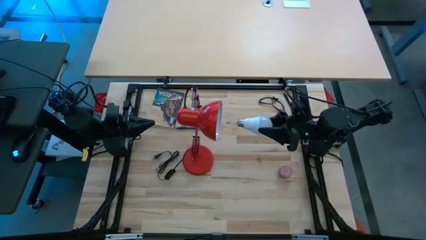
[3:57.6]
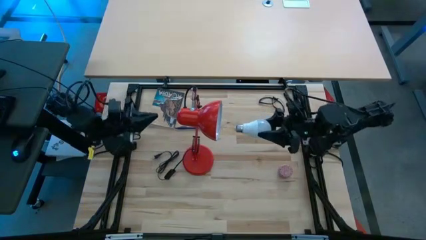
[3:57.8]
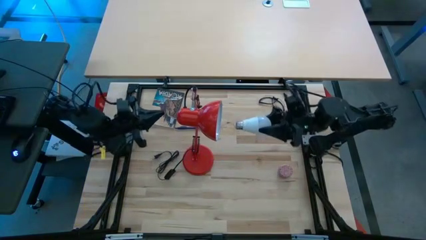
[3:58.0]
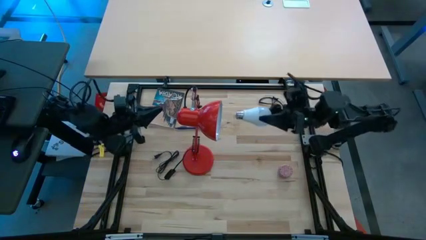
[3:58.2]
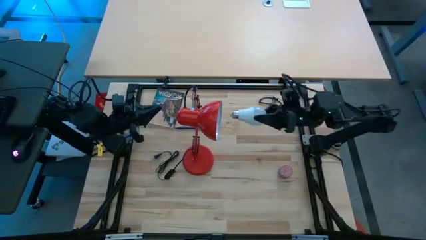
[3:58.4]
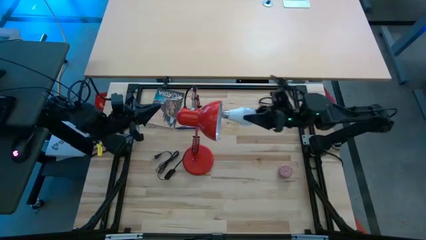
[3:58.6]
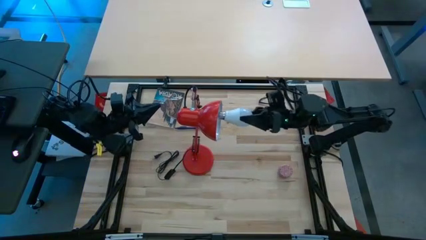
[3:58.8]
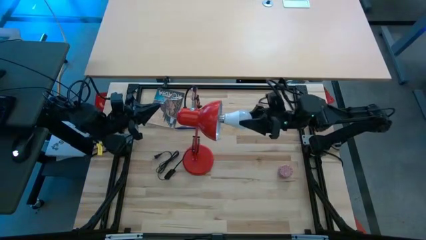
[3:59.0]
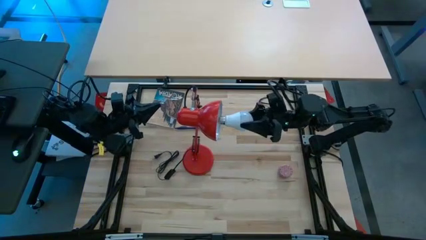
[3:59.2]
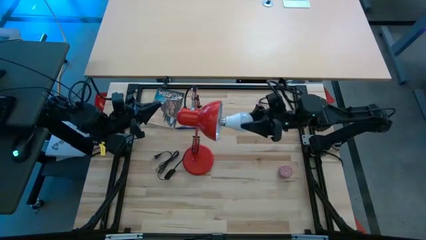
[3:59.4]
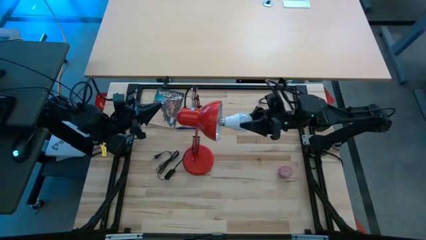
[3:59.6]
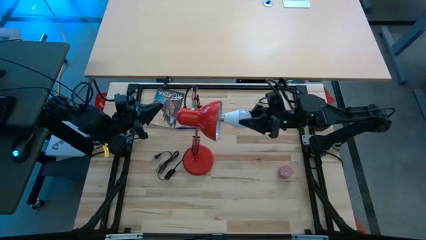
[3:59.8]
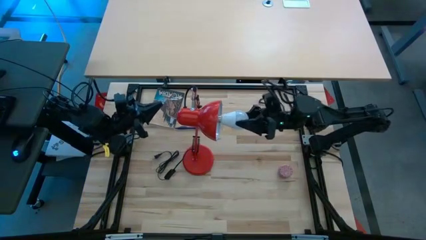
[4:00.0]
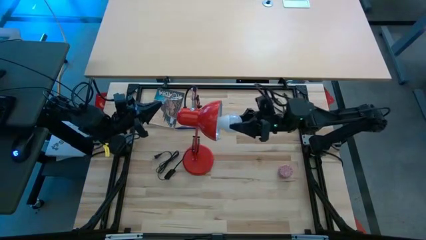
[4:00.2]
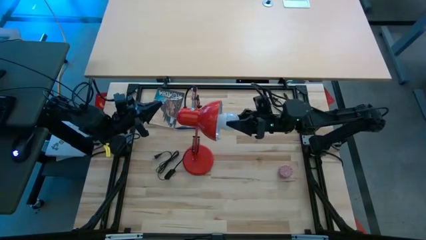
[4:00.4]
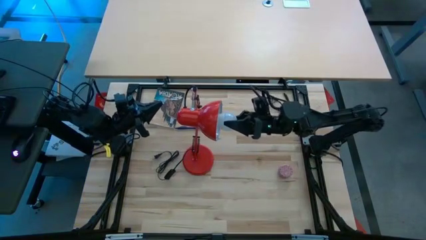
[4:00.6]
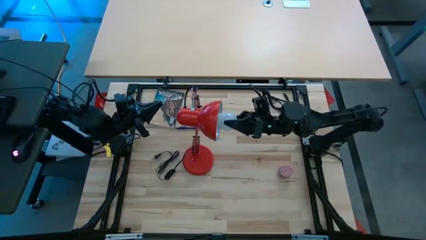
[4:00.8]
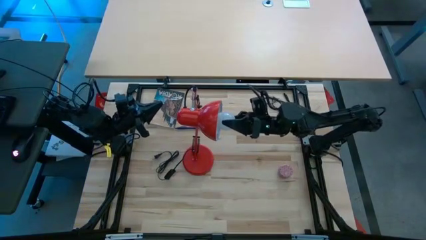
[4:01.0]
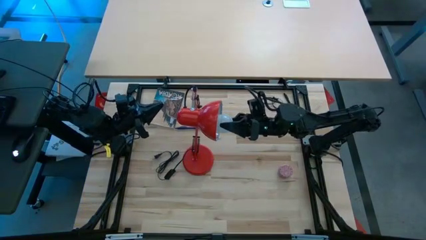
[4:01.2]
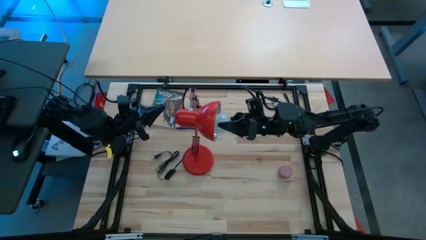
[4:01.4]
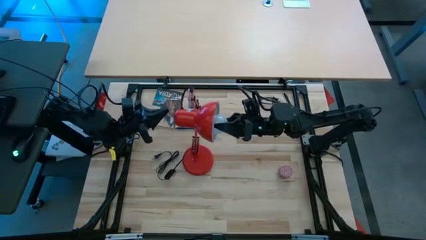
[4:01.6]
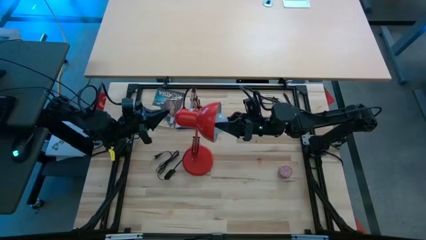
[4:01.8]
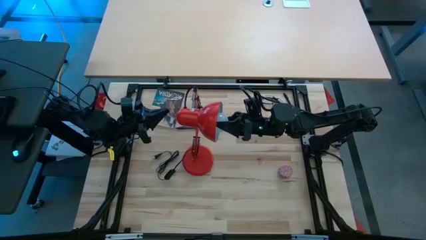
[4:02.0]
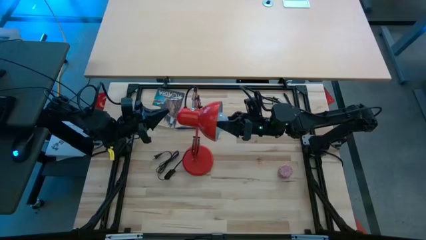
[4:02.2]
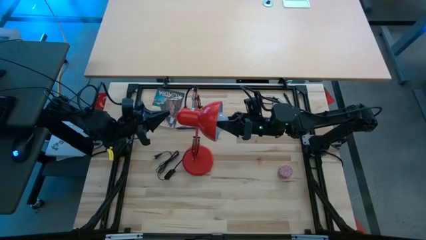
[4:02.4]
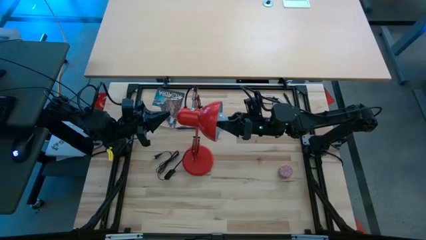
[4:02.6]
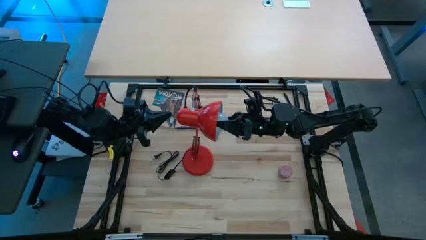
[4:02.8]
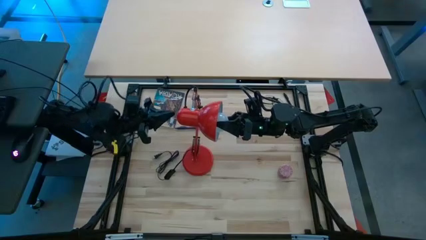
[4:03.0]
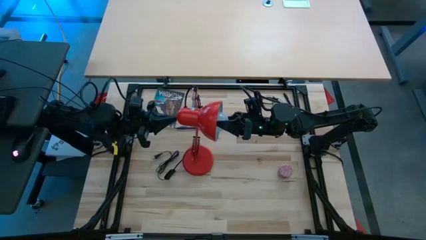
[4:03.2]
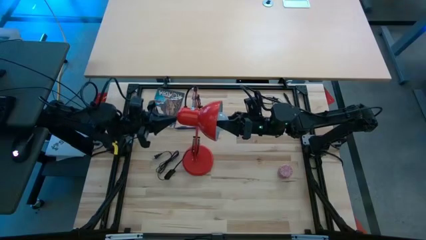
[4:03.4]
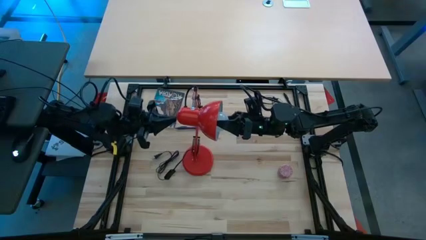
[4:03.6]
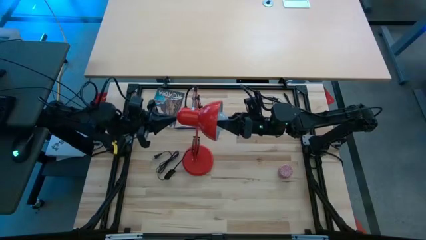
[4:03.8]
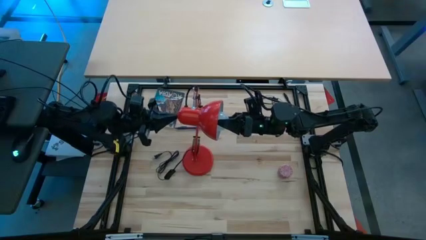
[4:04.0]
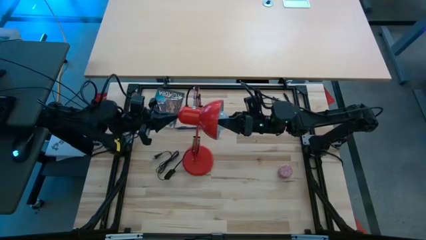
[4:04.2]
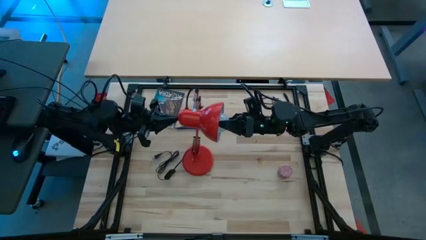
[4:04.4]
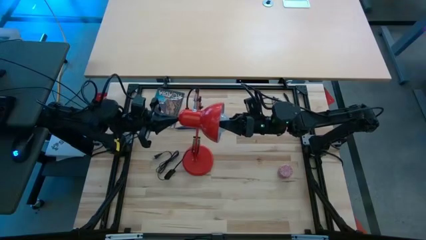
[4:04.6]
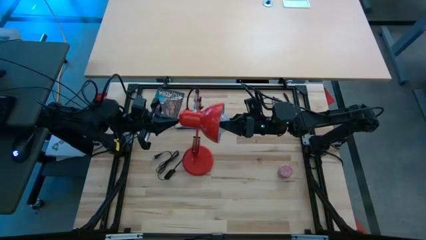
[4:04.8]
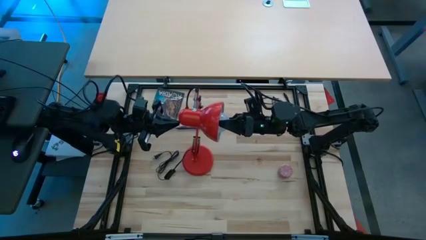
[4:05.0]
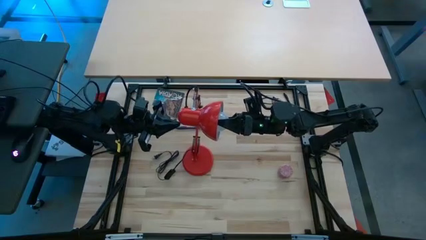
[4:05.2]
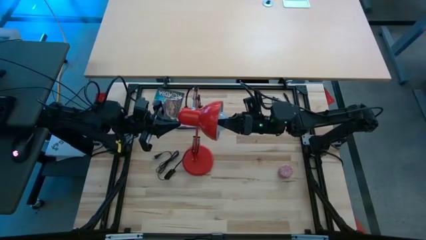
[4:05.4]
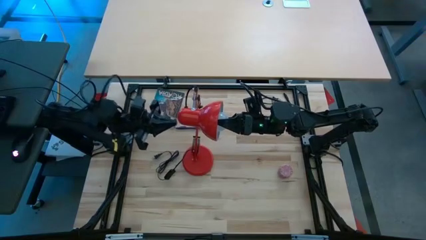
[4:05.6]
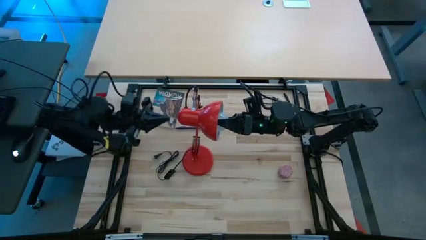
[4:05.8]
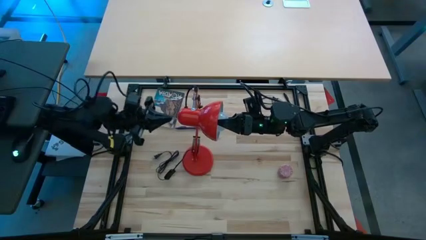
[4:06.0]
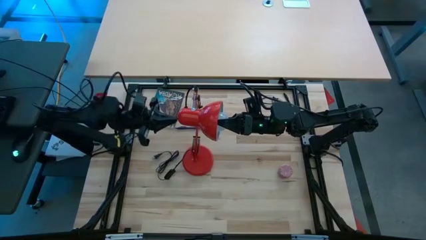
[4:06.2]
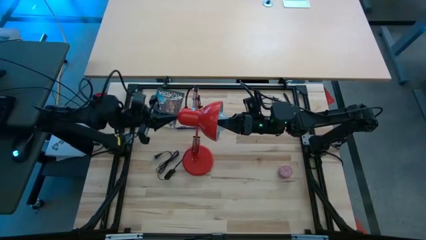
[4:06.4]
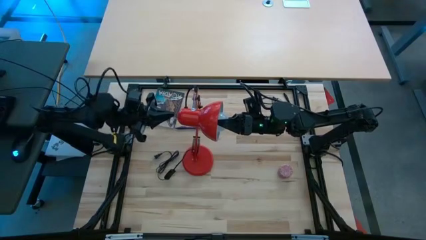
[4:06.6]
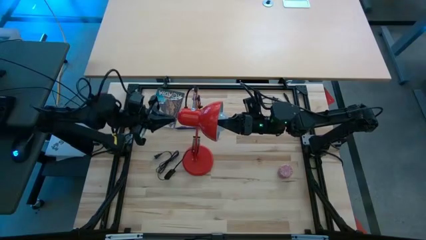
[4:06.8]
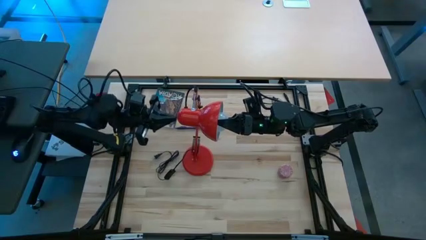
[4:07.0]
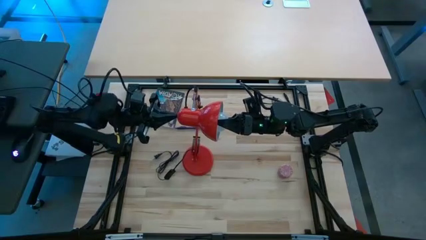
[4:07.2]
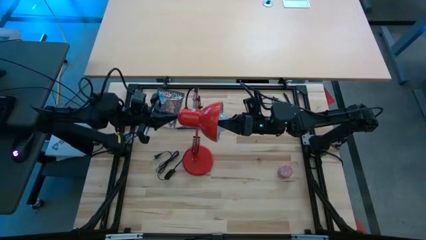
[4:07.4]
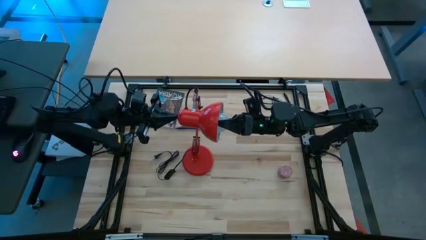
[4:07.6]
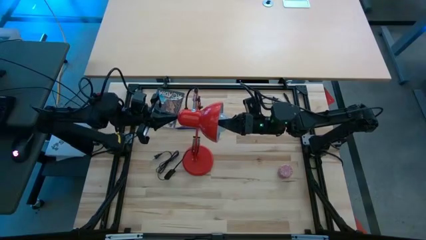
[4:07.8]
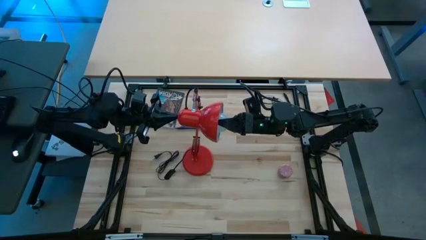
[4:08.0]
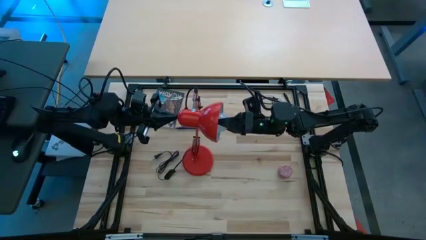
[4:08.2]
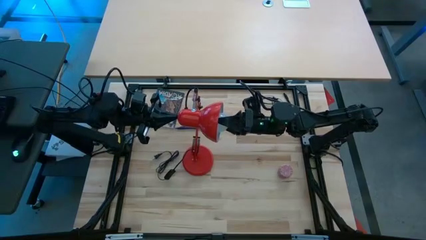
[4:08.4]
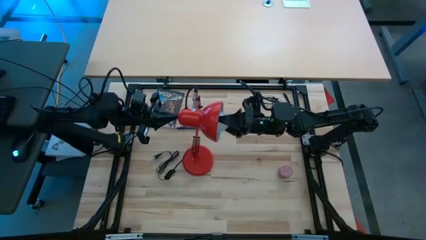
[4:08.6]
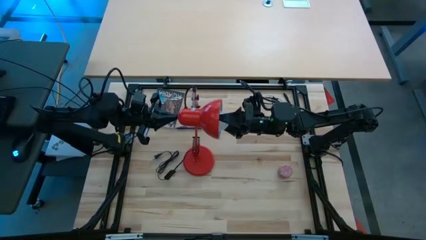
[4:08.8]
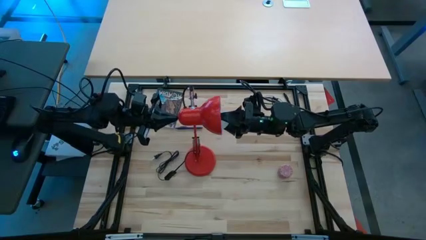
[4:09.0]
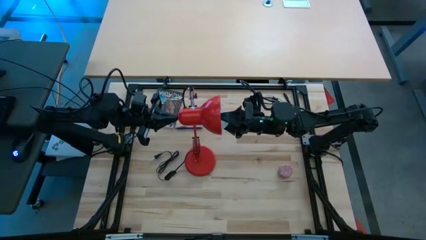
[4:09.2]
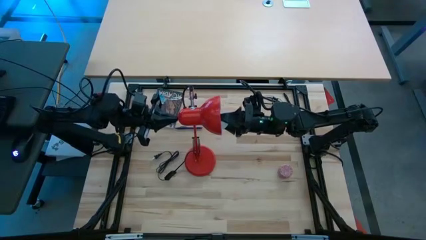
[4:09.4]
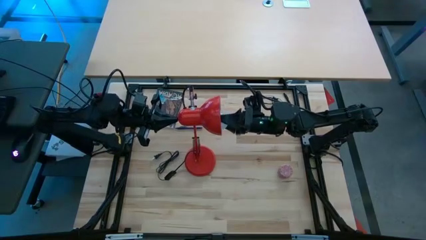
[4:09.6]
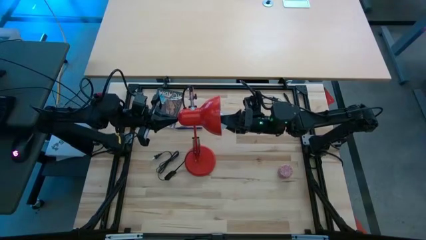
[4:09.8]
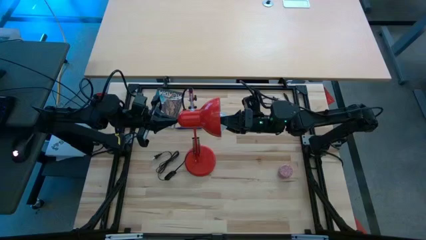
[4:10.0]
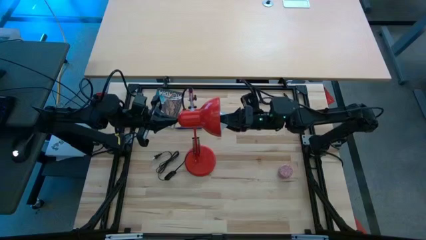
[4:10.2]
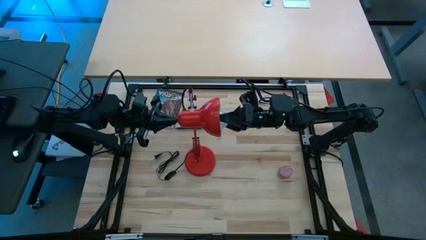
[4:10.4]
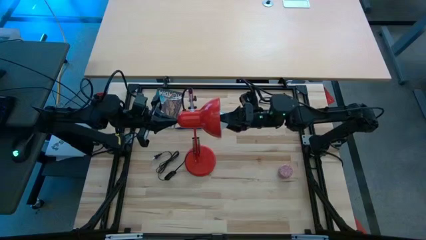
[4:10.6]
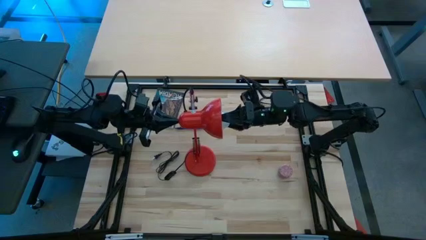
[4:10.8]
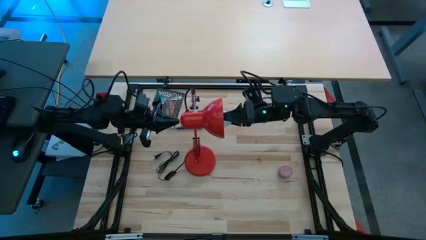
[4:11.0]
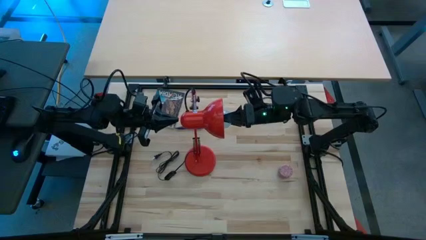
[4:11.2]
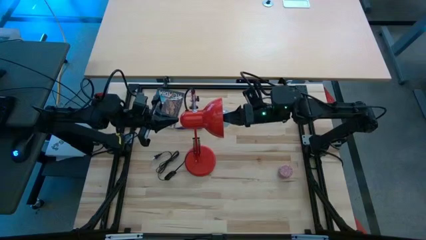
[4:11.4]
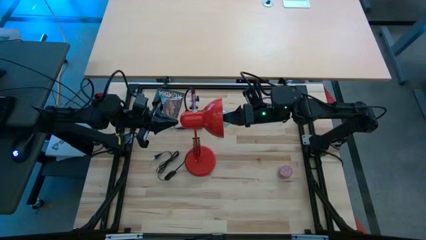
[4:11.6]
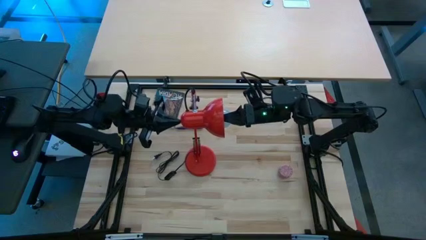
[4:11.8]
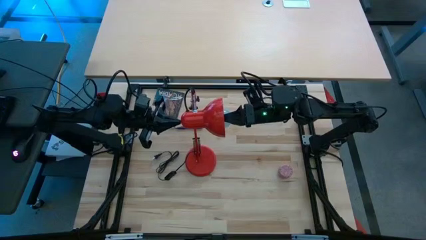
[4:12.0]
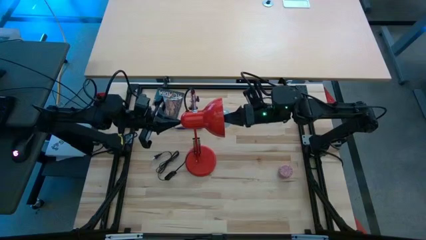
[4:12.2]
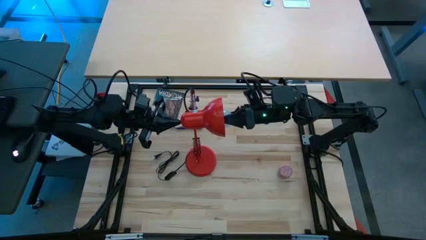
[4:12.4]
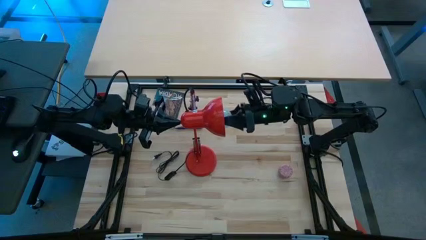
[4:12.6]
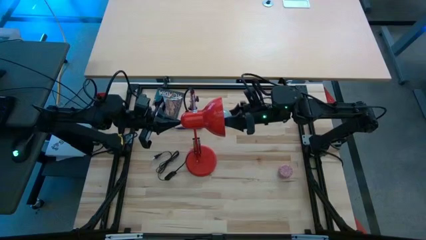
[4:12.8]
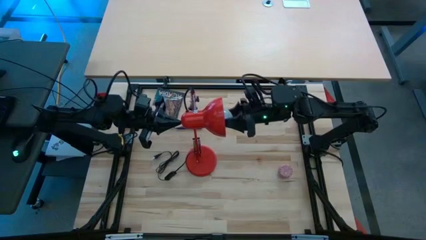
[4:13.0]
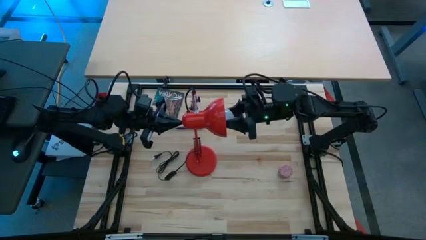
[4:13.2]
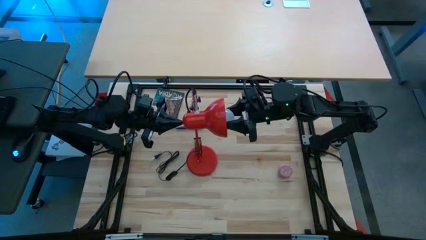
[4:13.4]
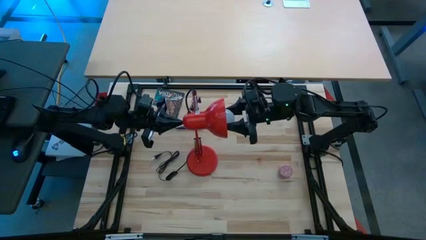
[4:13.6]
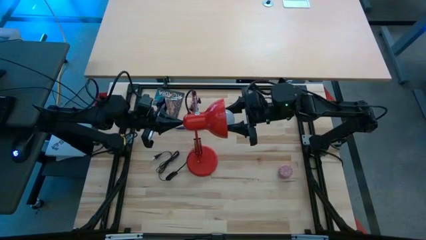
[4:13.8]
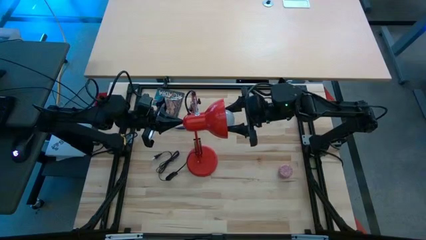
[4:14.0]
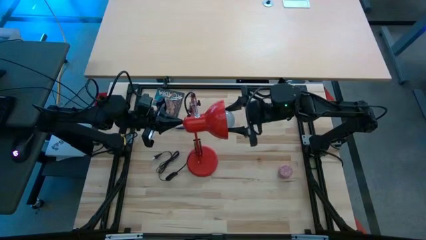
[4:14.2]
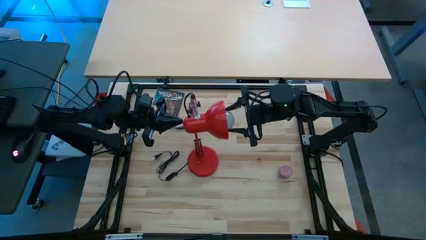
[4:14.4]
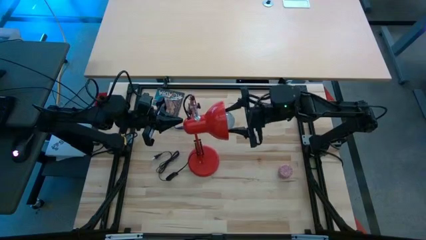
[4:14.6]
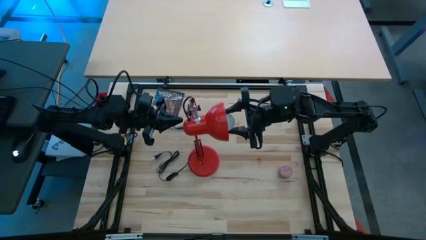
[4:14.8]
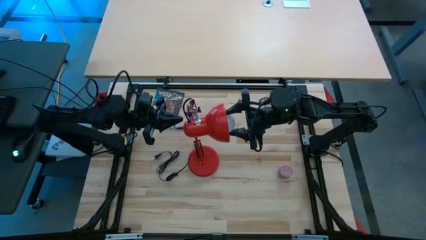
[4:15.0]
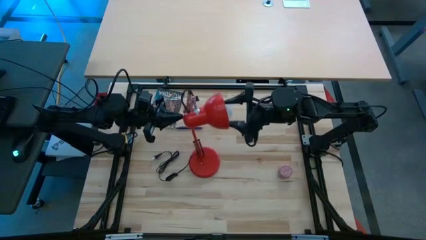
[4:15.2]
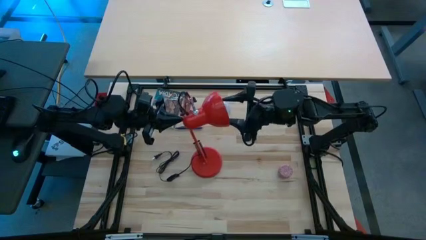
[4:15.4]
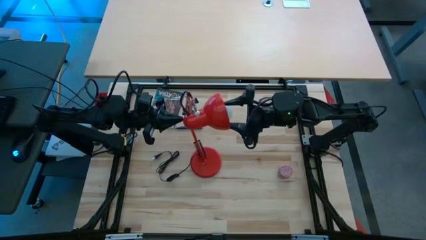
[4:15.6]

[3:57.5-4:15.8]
Task: Screw lightbulb
Insert the lightbulb on the lamp
